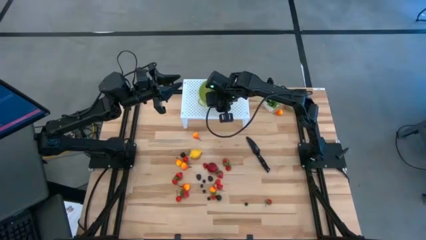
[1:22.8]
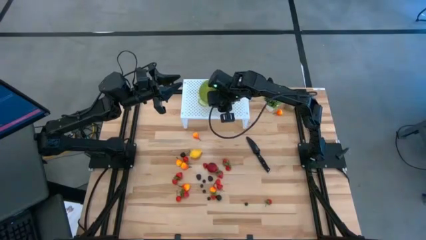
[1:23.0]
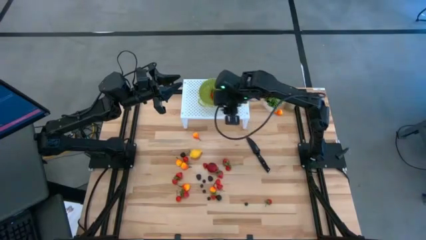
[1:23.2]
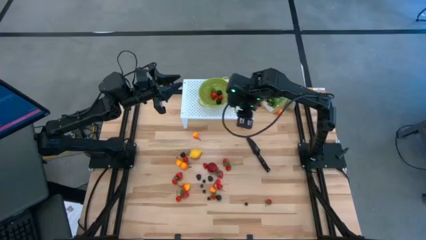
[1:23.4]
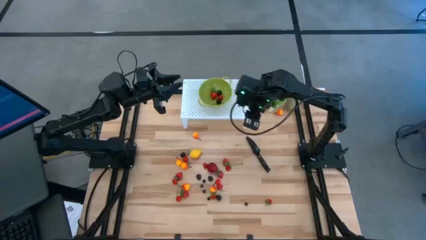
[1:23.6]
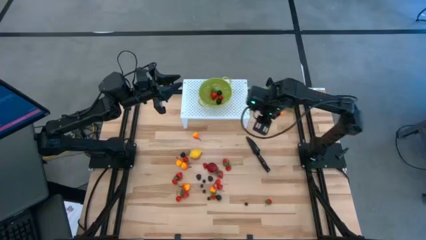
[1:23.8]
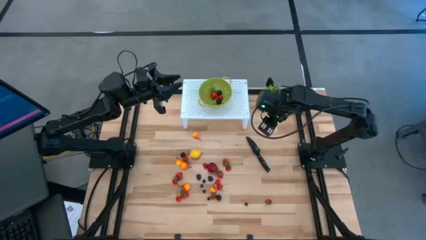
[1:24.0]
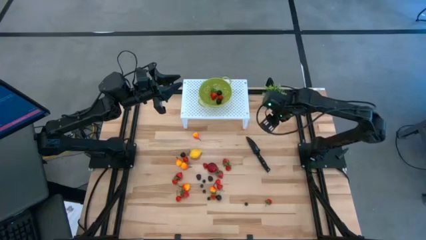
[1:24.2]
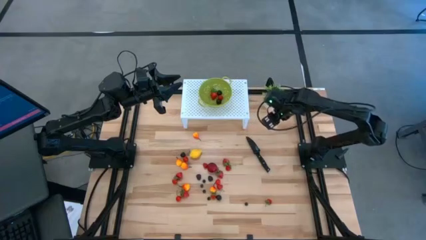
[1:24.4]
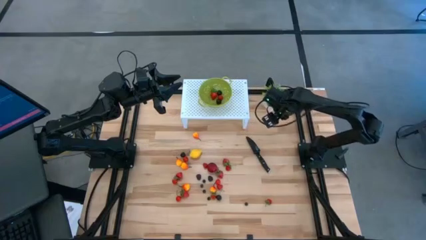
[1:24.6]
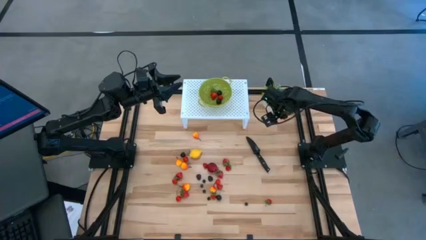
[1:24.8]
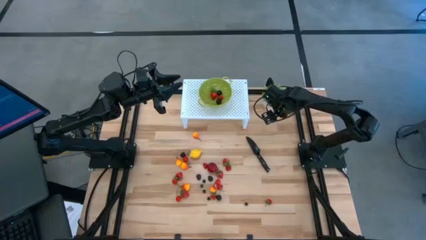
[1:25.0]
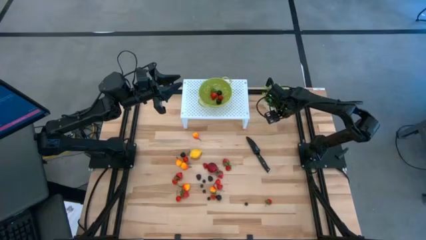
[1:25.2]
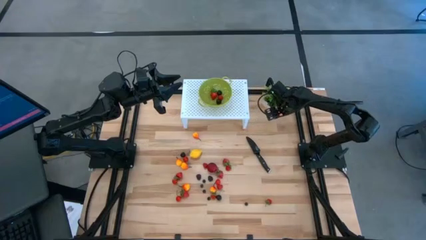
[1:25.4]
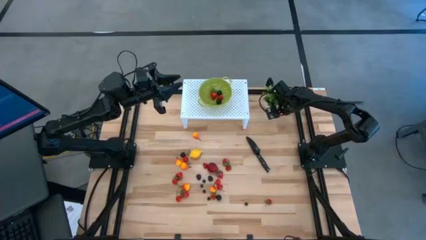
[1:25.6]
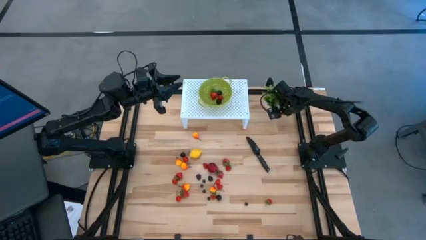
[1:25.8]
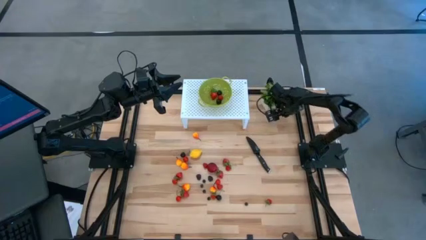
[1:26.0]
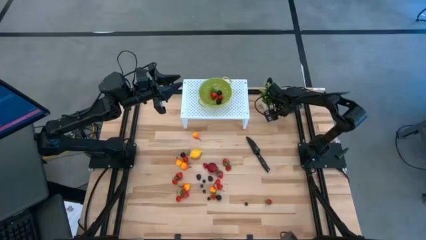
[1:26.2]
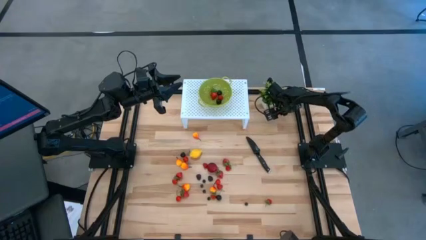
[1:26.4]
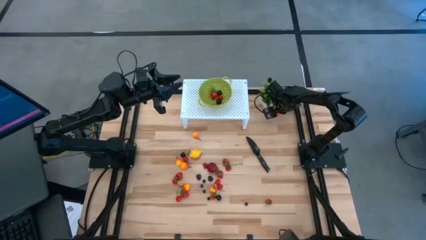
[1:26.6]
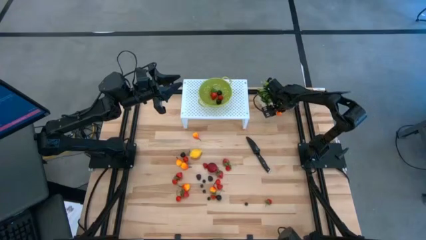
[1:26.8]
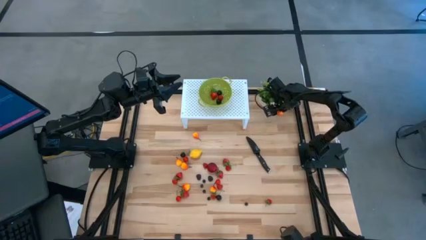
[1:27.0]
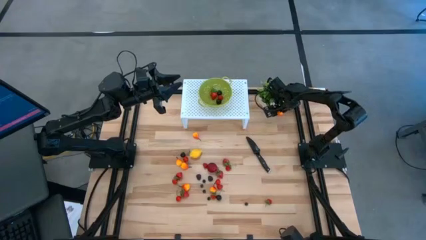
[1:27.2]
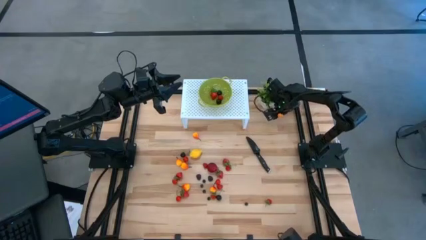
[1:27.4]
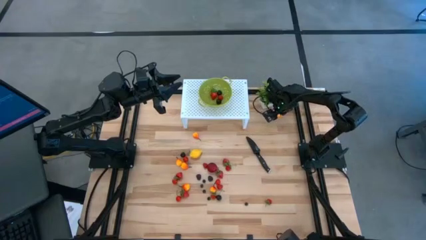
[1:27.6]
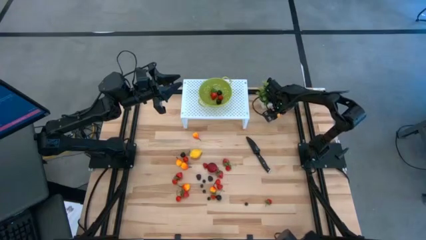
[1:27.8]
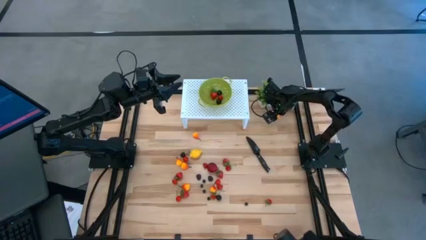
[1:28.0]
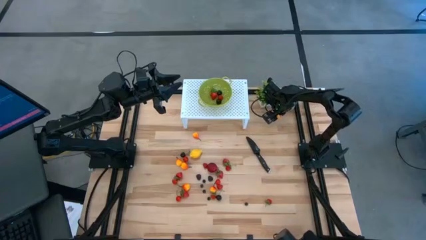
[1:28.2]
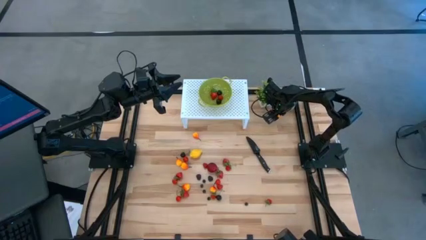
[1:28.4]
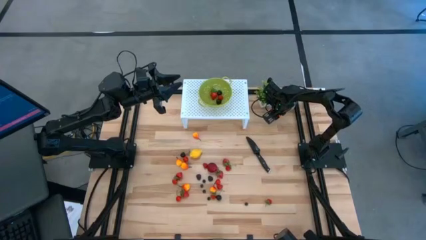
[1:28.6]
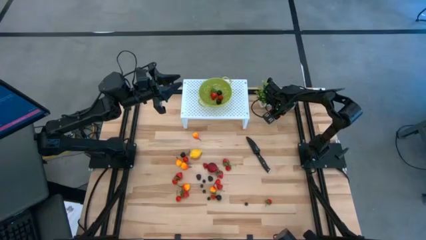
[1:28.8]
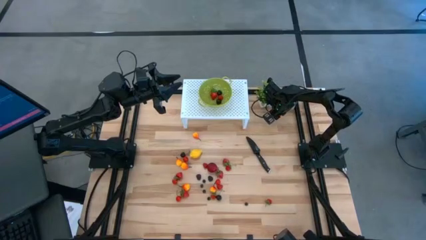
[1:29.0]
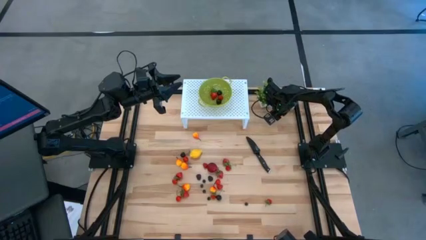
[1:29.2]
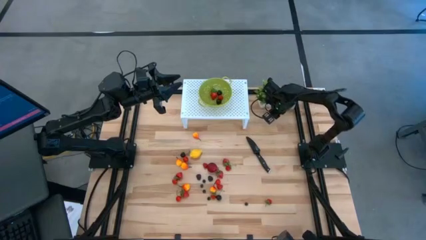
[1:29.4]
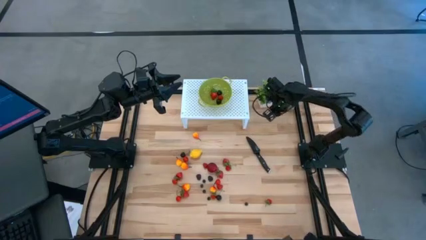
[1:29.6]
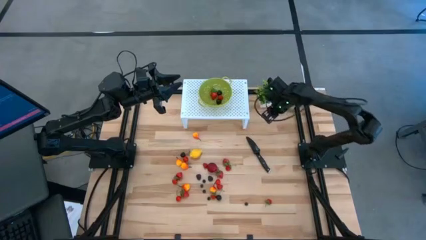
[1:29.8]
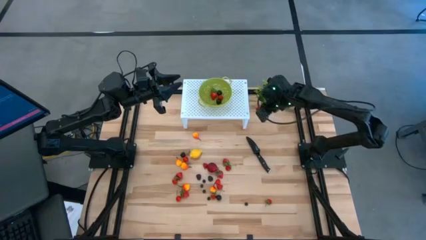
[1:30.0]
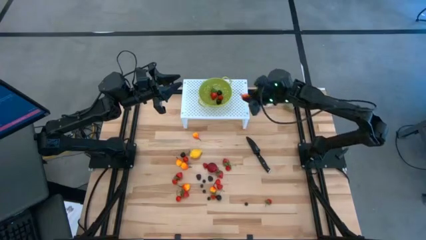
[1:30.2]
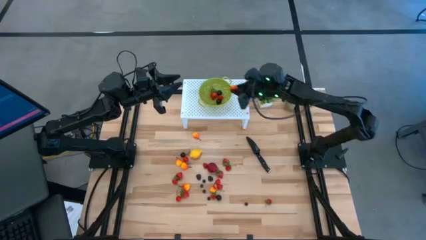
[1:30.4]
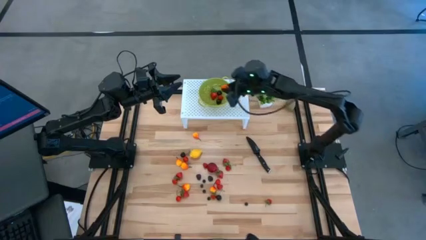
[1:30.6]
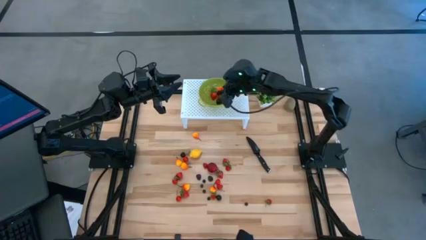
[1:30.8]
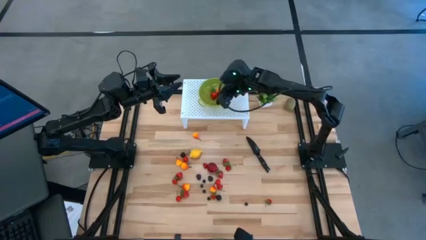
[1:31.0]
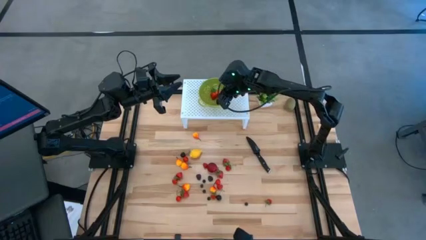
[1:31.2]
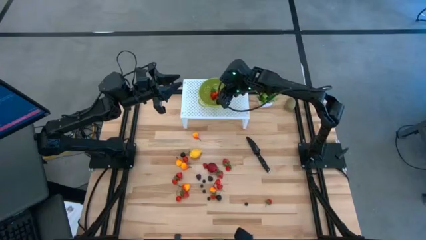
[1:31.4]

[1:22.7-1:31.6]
Task: Pick & Place Fruit
Put the yellow peach into the green strainer bowl

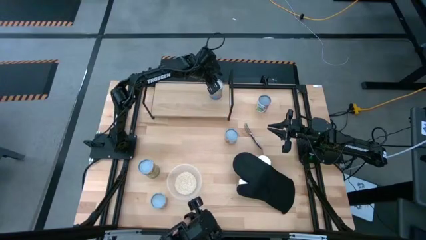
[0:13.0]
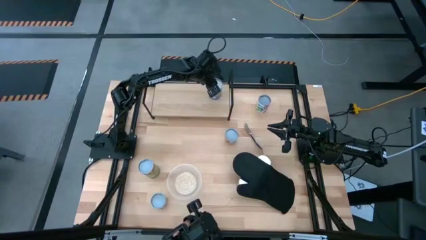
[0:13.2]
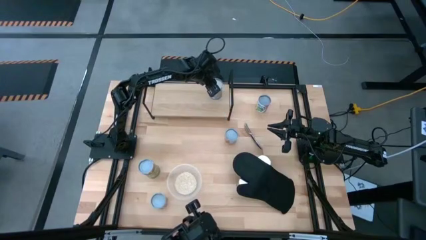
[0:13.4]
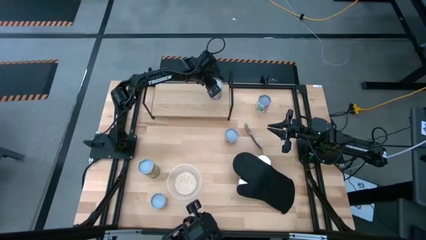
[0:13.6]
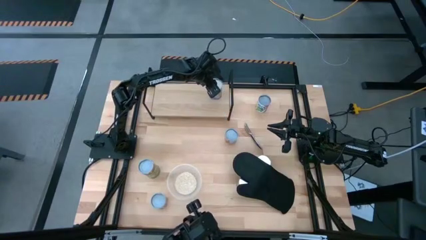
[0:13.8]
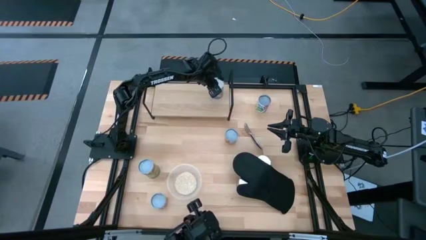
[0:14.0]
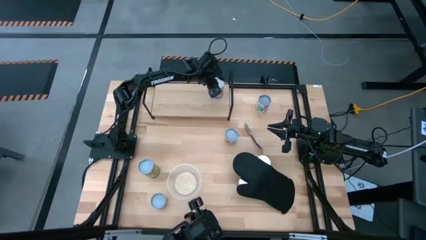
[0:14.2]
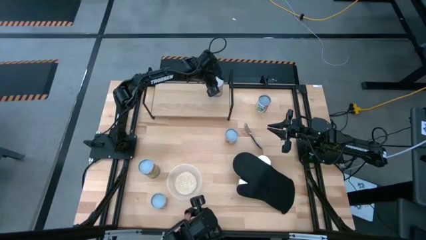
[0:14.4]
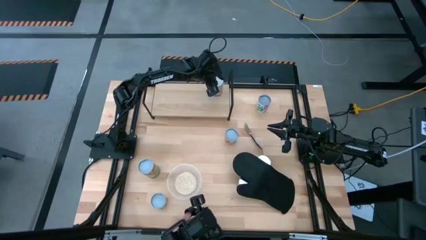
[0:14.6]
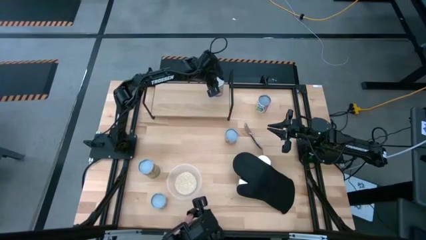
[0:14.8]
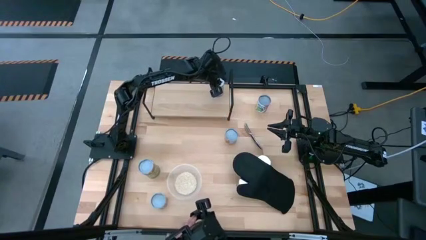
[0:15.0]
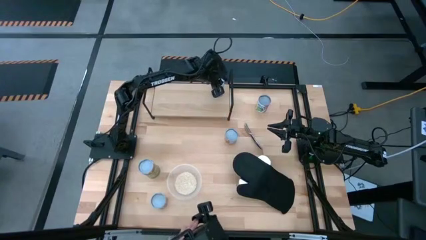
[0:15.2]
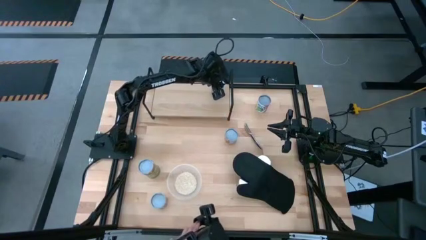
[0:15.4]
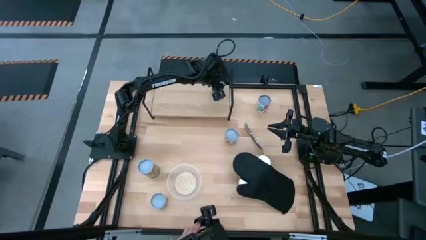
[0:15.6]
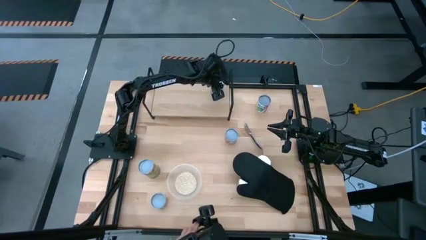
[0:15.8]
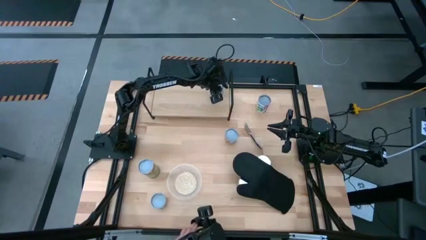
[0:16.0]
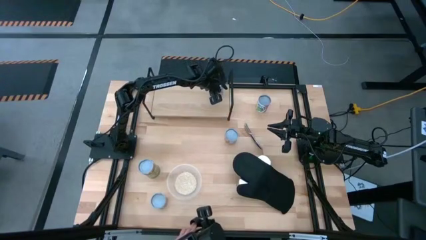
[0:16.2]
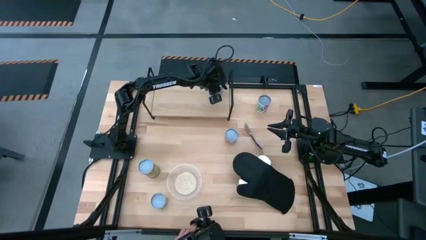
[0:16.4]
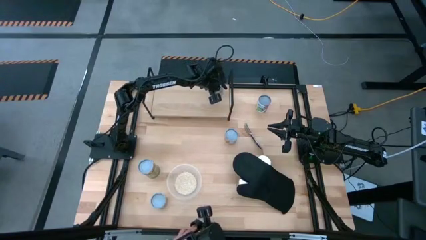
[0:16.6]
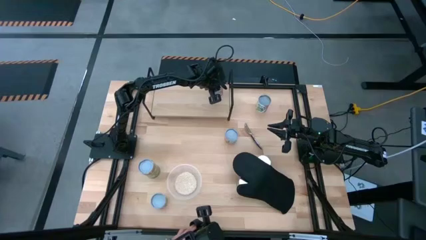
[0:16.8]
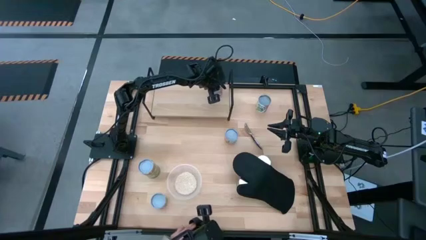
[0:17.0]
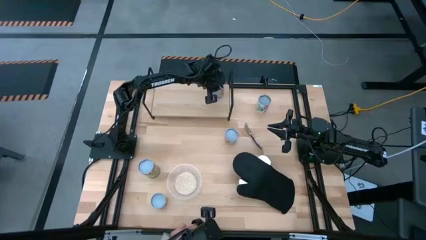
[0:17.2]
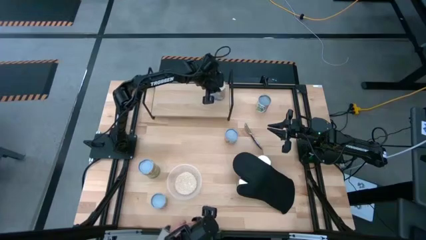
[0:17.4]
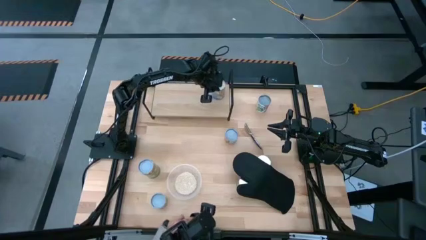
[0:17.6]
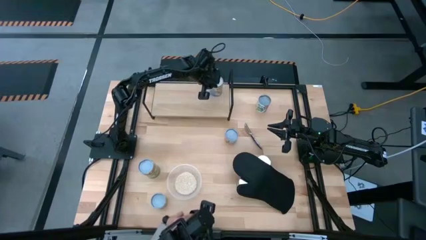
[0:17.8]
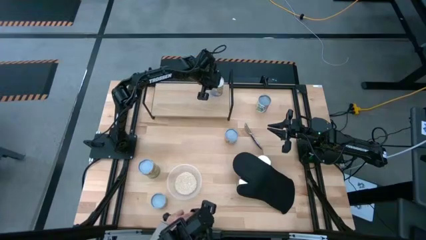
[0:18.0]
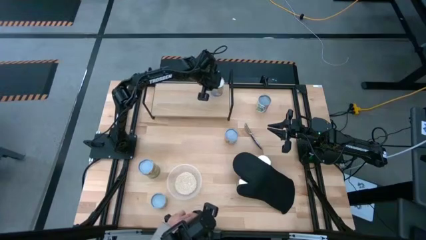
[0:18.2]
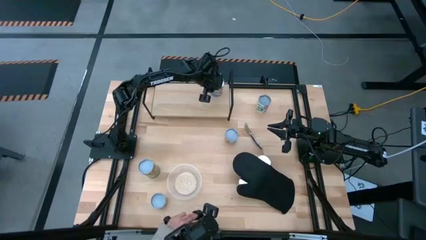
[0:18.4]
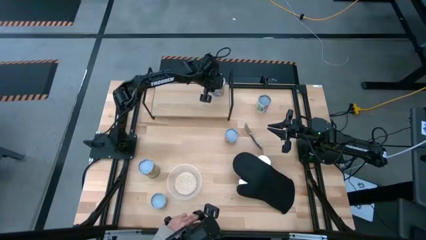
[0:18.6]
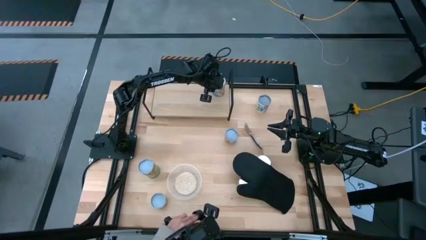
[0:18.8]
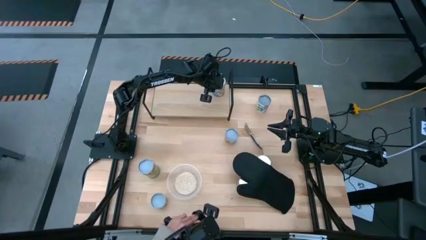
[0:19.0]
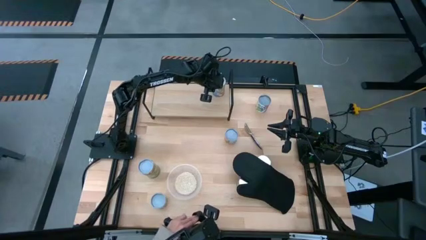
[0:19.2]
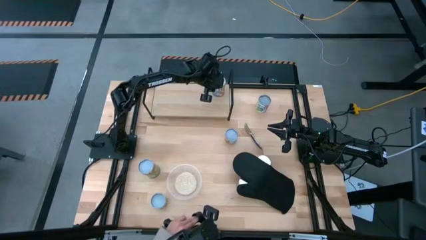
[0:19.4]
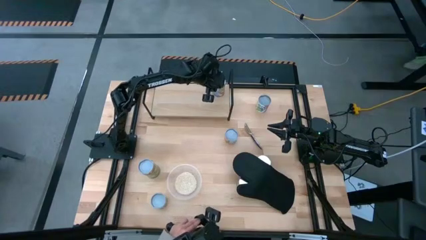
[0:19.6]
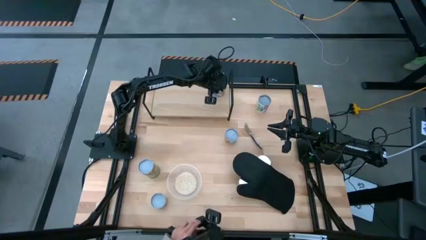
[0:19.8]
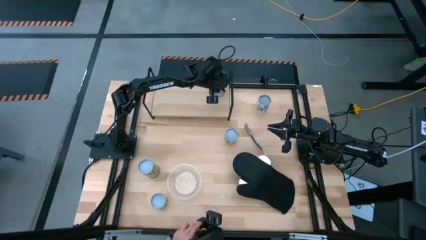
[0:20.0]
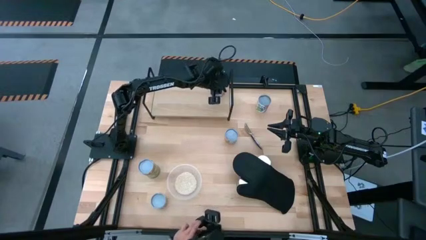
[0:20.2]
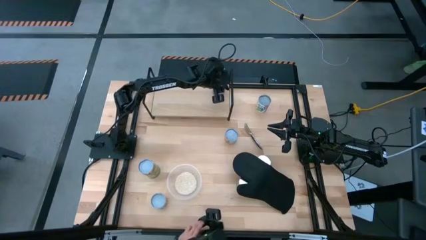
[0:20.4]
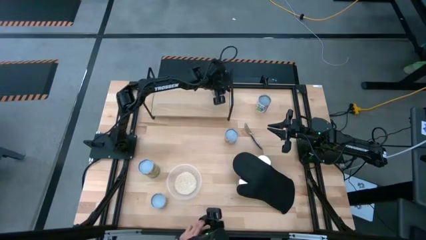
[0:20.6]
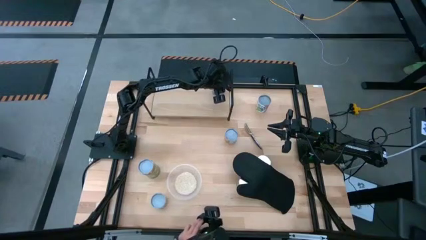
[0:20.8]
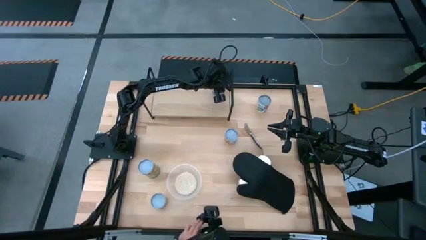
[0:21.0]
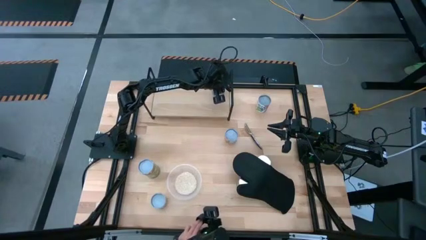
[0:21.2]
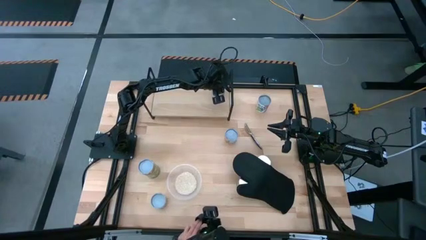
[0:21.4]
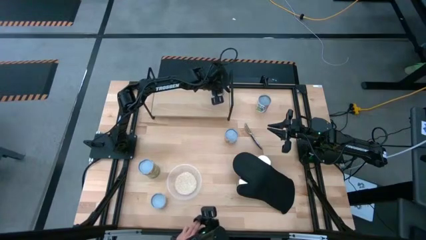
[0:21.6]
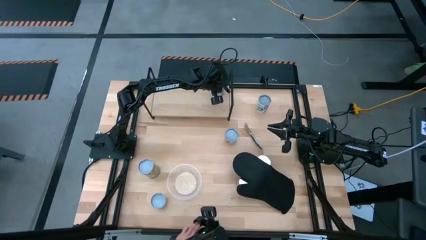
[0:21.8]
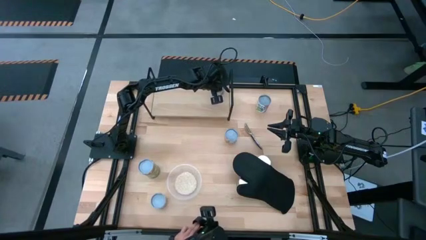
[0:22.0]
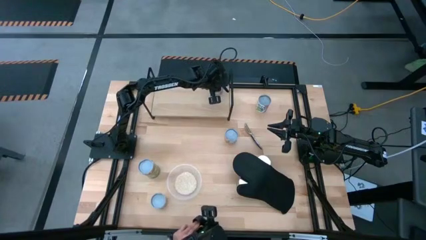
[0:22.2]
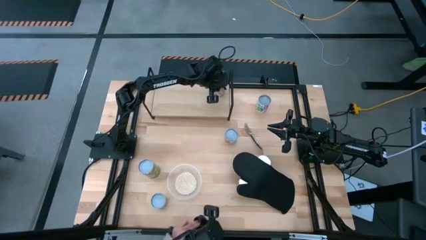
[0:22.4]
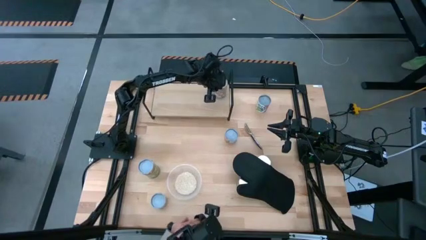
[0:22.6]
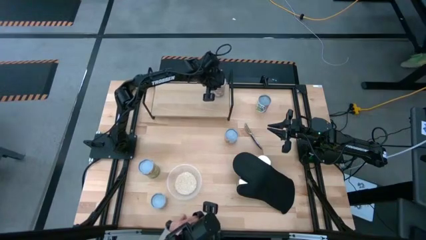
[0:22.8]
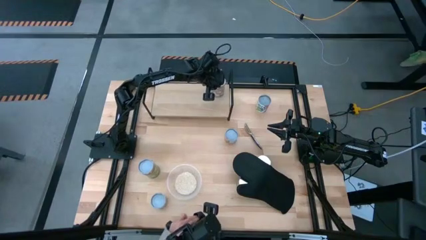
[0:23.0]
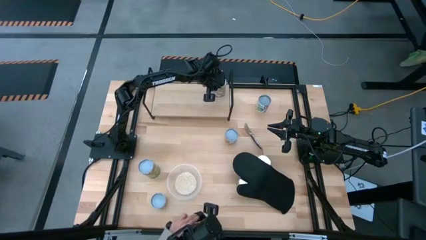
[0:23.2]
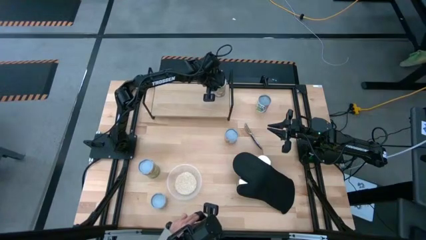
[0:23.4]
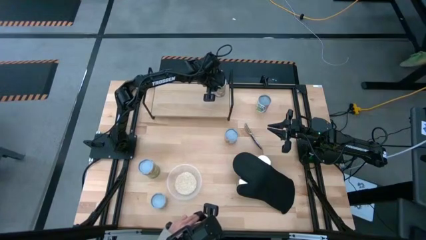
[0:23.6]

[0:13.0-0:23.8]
Task: Pick and place cans onto a shelf
Put the canned peaches on the shelf
